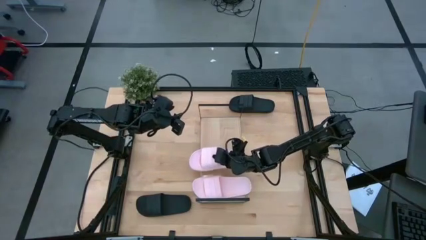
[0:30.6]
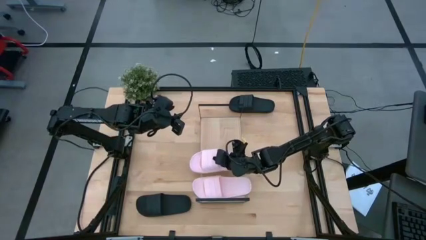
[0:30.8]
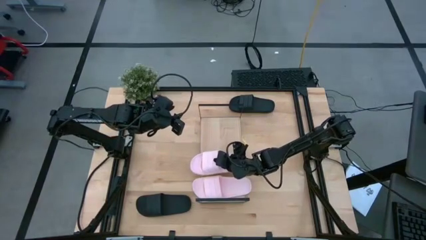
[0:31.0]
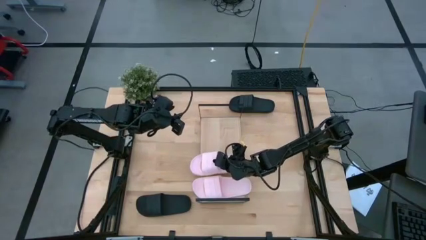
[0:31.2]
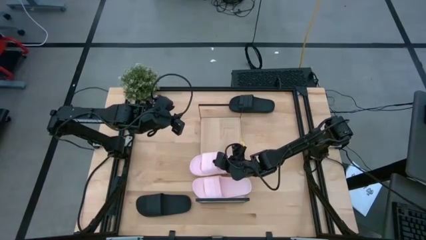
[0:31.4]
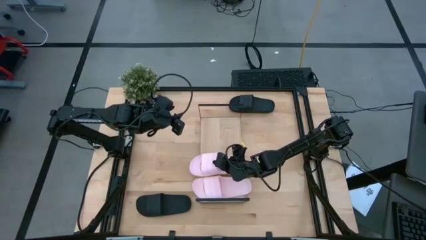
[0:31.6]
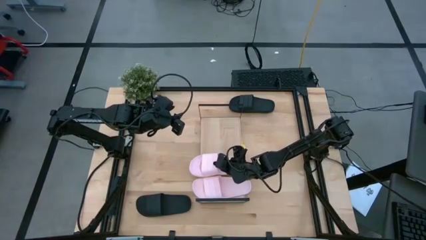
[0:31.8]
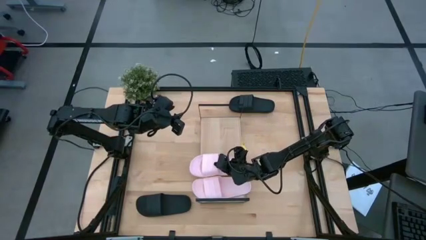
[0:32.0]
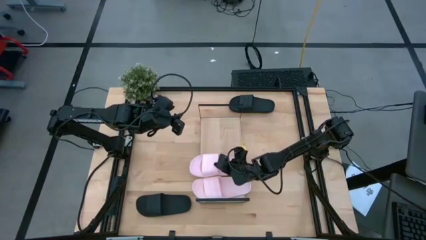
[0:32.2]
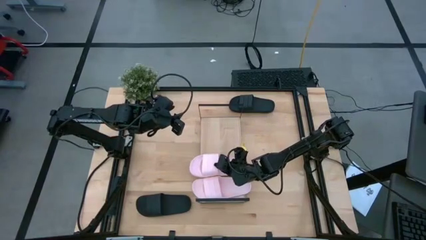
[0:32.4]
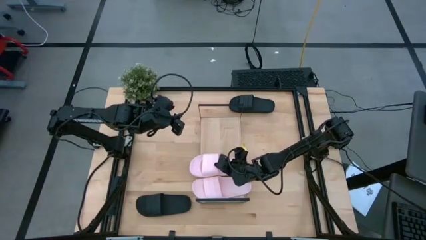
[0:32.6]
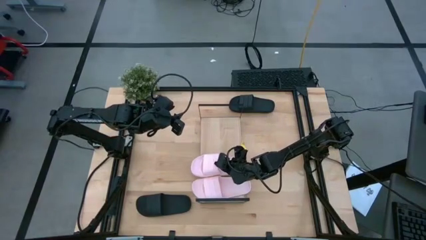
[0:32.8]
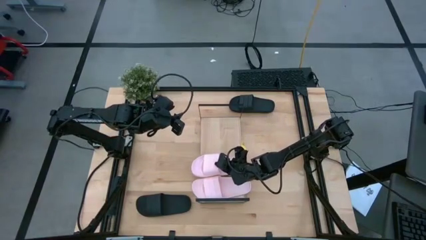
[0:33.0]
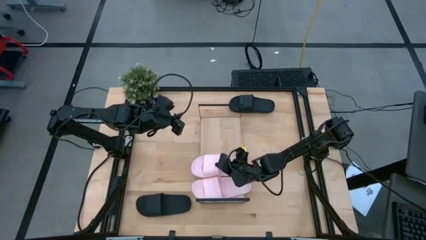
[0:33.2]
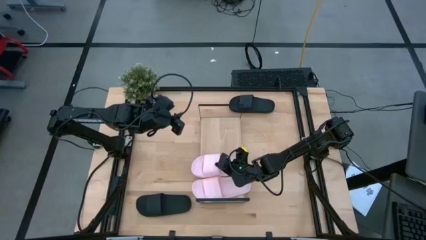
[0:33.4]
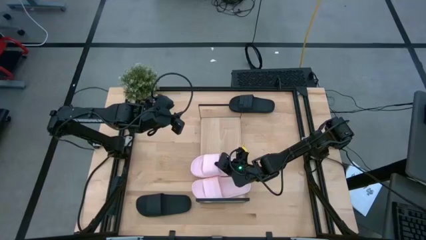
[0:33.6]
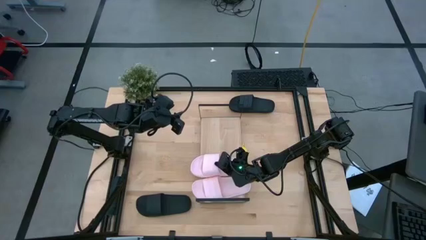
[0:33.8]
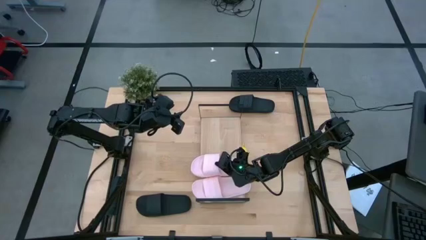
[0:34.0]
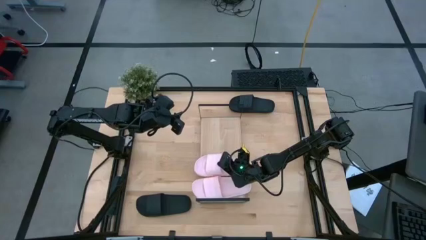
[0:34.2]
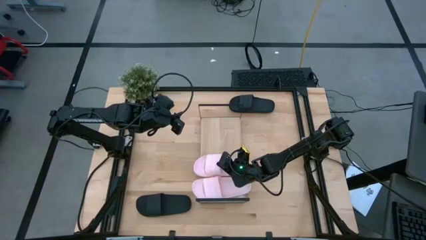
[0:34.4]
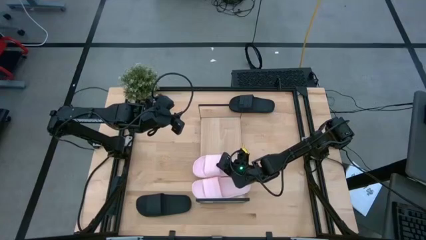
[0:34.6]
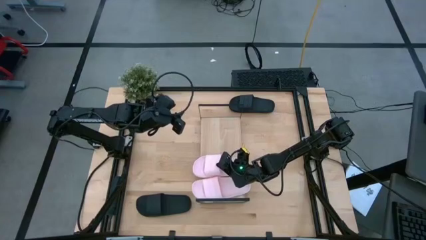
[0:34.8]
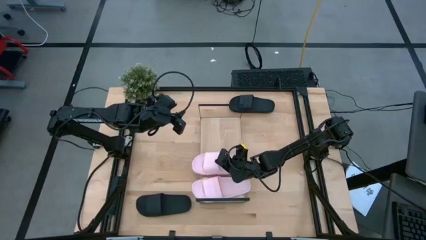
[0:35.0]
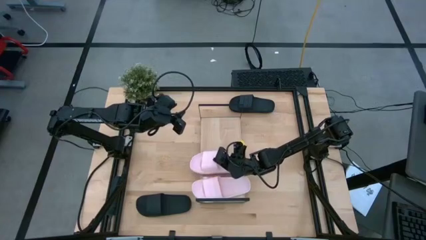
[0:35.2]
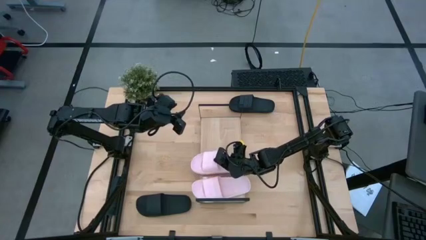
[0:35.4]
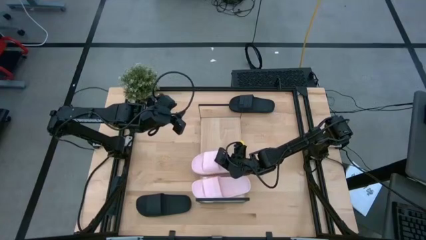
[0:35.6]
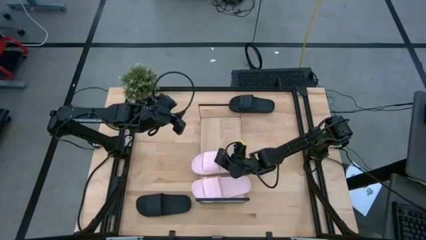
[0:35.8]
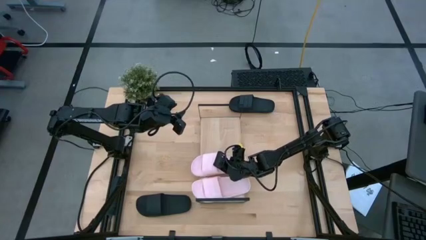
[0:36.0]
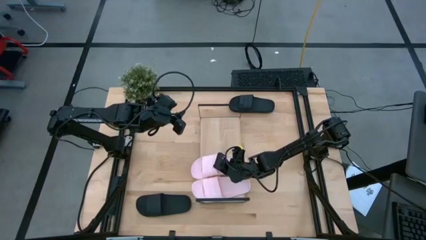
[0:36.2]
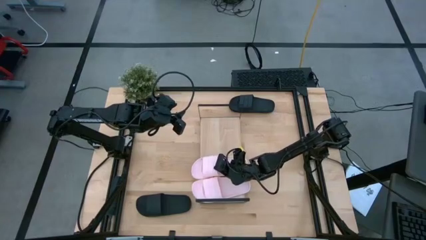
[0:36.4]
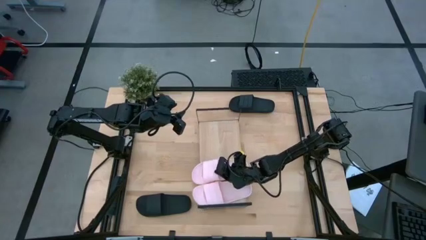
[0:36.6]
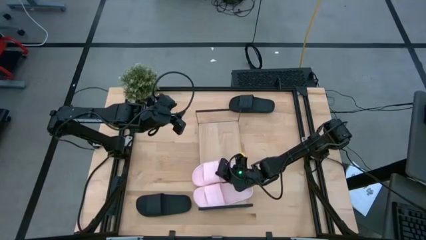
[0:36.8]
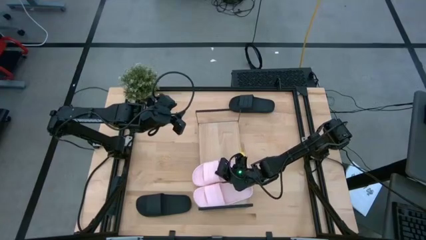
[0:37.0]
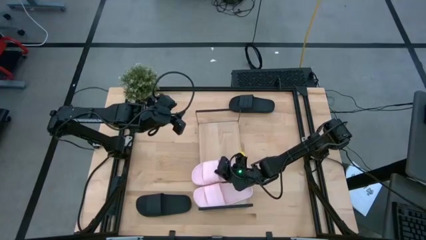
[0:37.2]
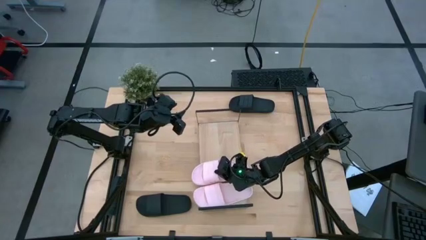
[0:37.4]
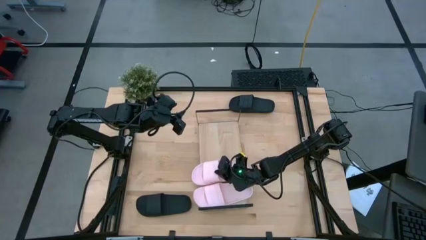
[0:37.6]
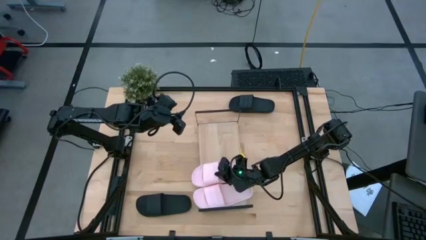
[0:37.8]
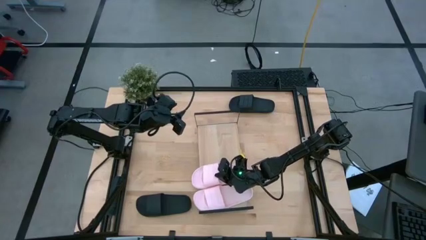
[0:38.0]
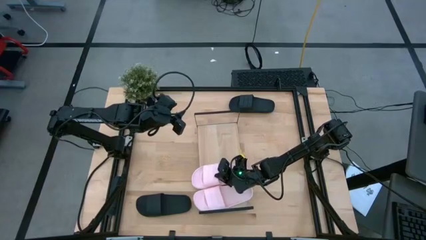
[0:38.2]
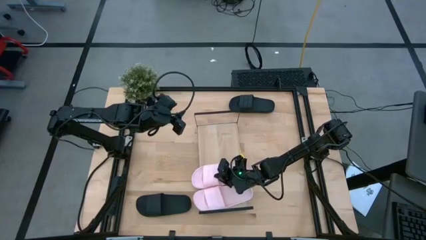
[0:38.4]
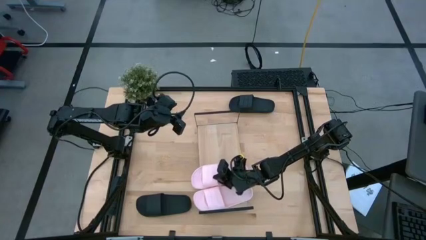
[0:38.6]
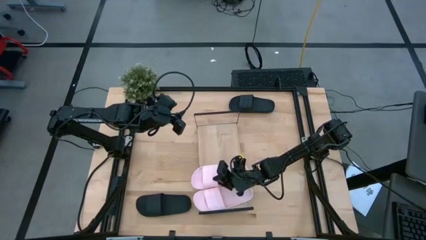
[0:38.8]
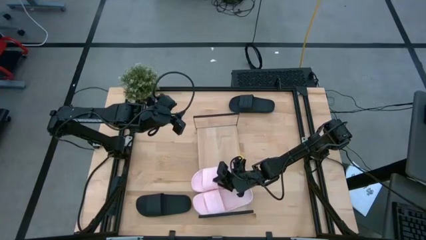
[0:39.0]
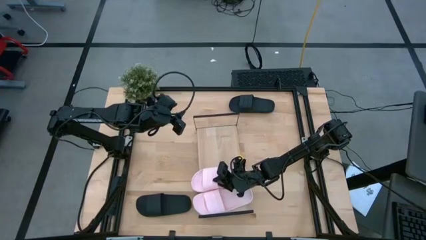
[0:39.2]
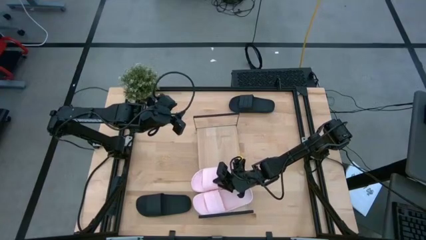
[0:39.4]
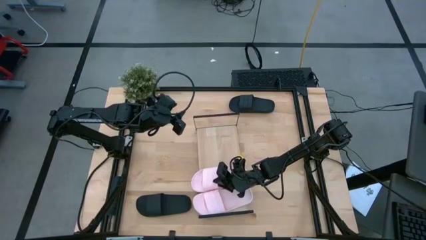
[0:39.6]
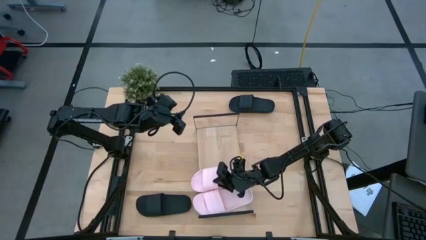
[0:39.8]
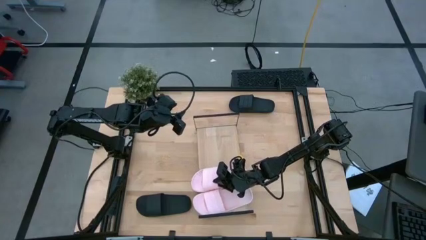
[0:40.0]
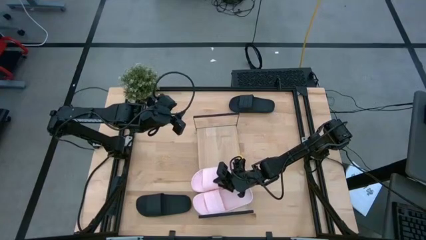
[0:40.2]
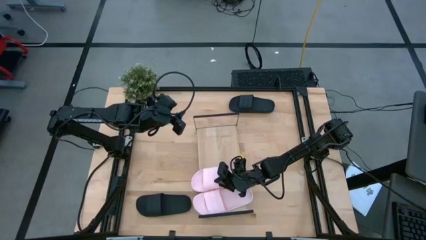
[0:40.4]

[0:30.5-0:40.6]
Task: Pick and place slides into the shelf
Put the pink slipper on the shelf

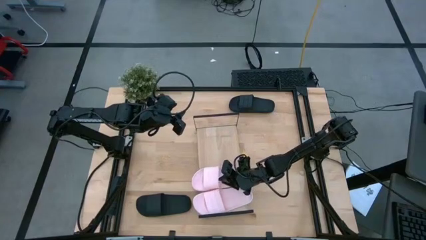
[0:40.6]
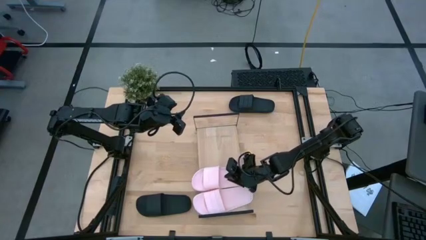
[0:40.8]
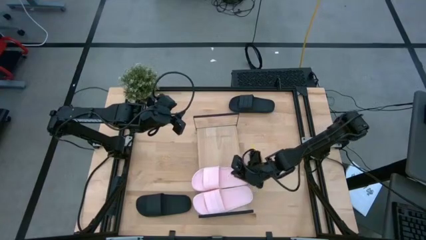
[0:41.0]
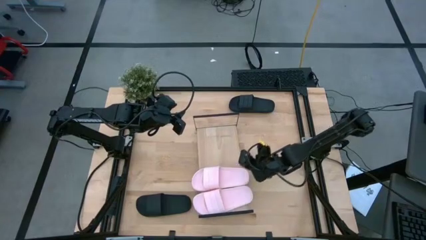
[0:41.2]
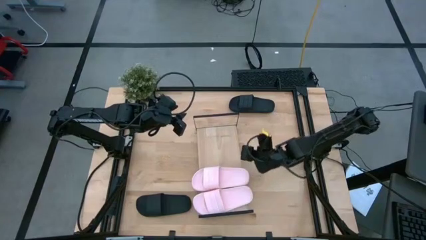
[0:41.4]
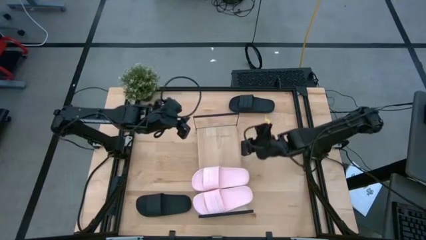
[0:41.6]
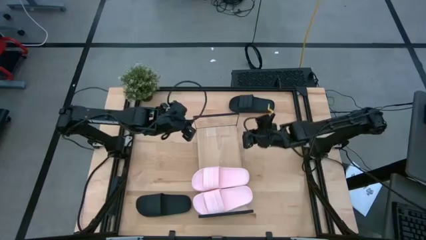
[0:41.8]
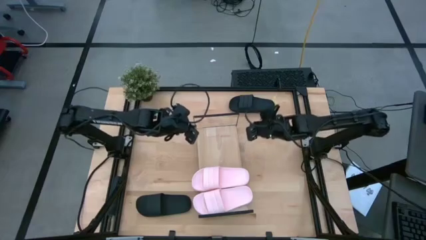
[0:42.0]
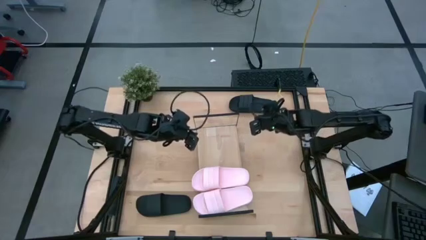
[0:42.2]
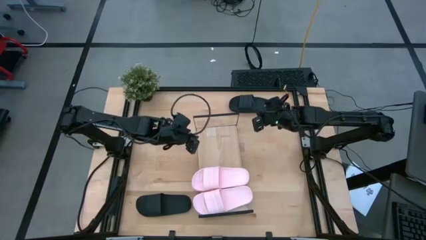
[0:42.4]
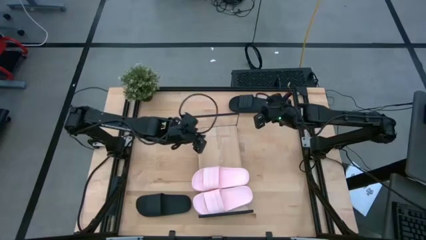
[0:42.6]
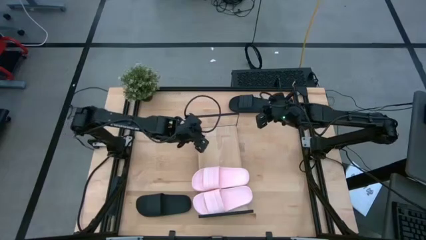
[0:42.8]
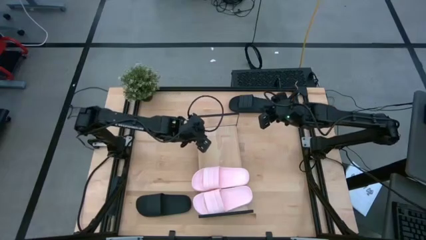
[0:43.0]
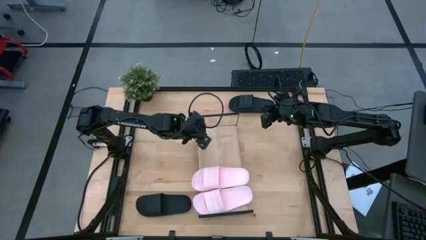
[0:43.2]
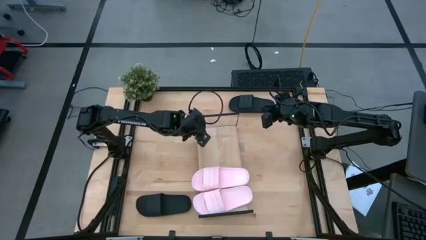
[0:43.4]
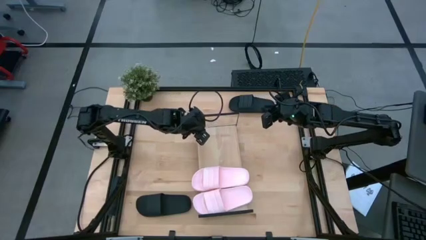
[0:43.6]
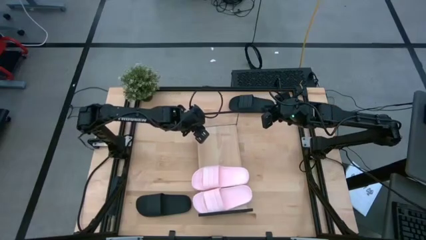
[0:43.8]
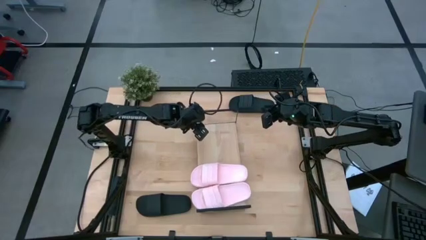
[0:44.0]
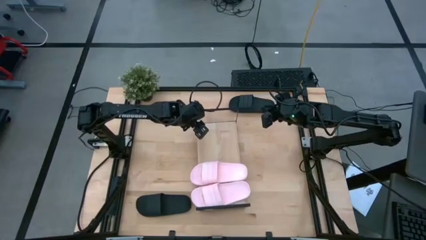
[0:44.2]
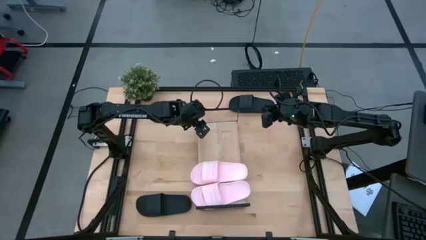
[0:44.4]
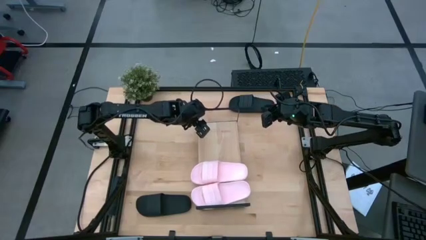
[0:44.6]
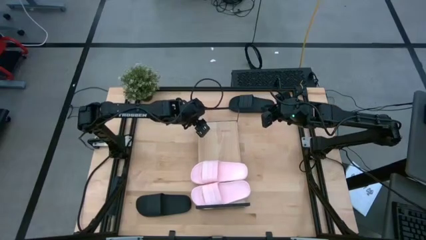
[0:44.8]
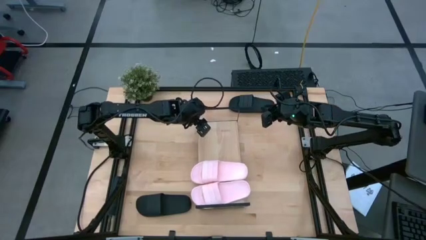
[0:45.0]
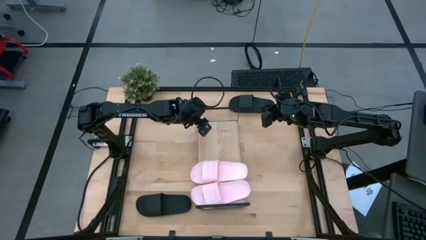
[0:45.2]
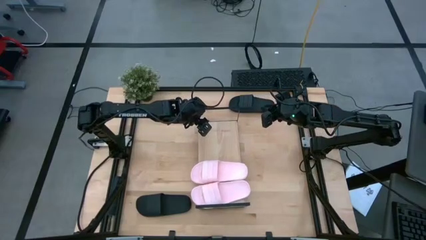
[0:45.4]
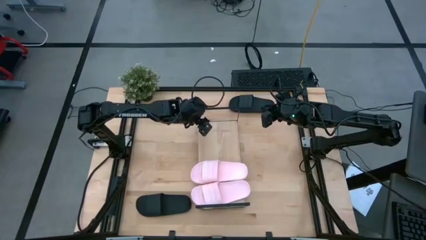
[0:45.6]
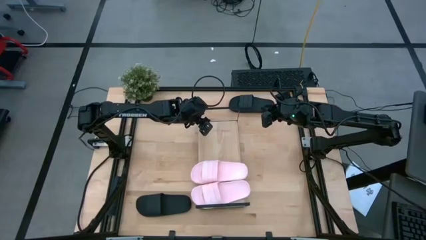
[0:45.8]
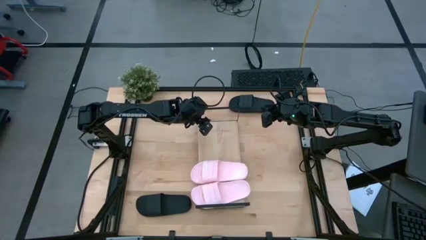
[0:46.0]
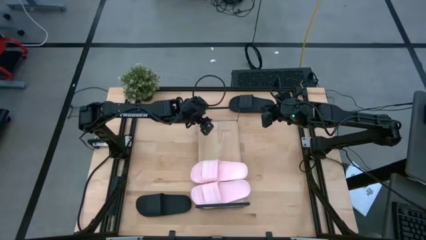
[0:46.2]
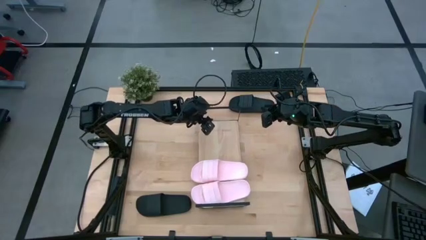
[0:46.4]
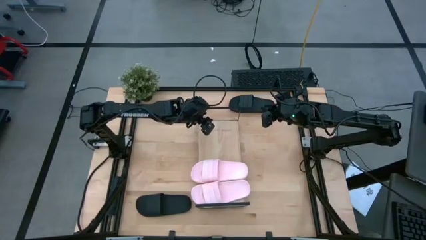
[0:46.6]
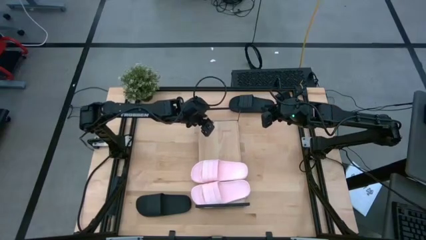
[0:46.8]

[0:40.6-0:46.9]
Adjust the shelf
